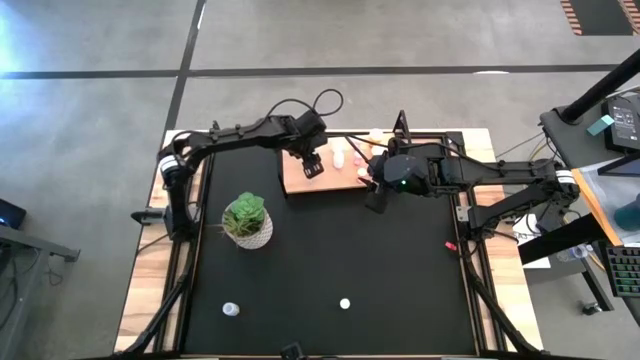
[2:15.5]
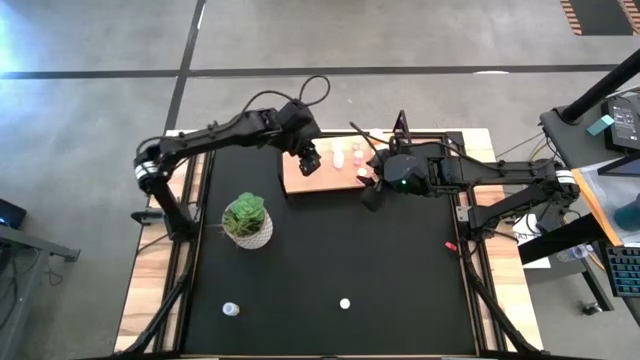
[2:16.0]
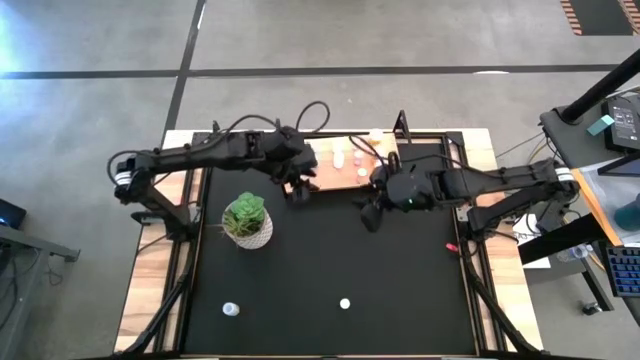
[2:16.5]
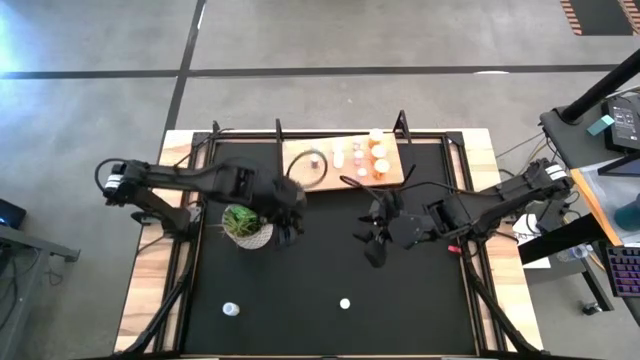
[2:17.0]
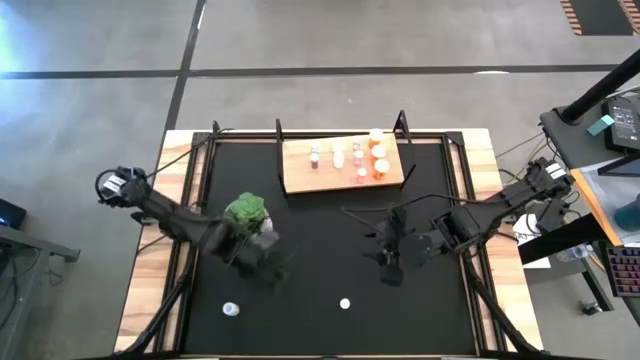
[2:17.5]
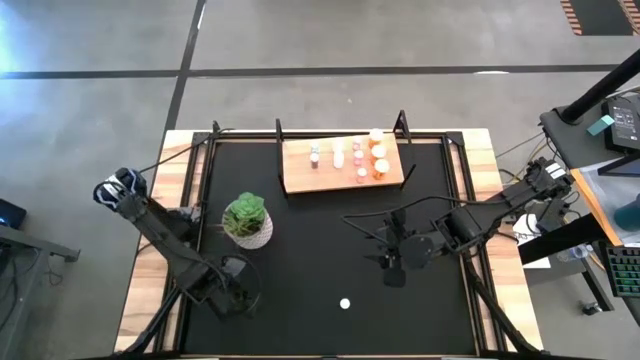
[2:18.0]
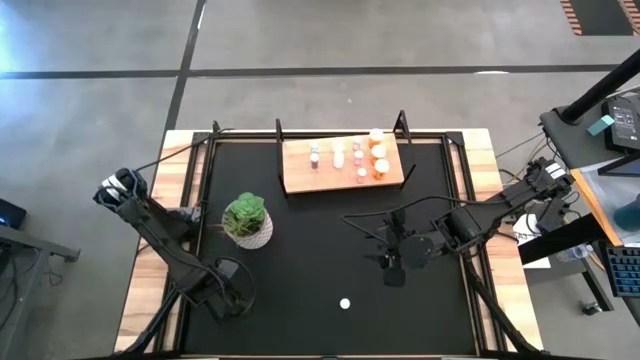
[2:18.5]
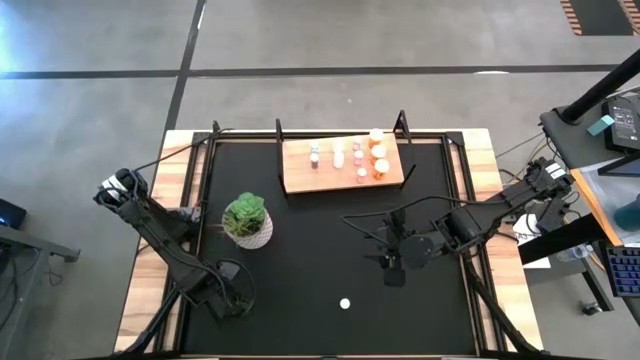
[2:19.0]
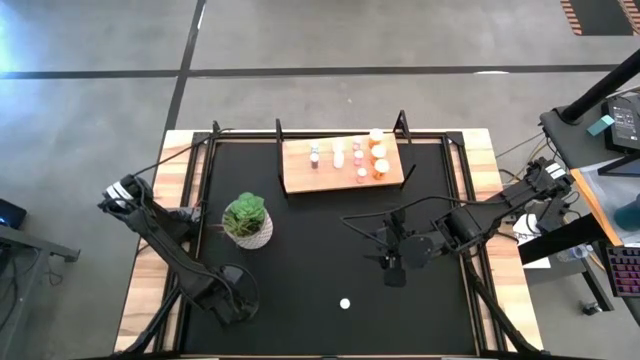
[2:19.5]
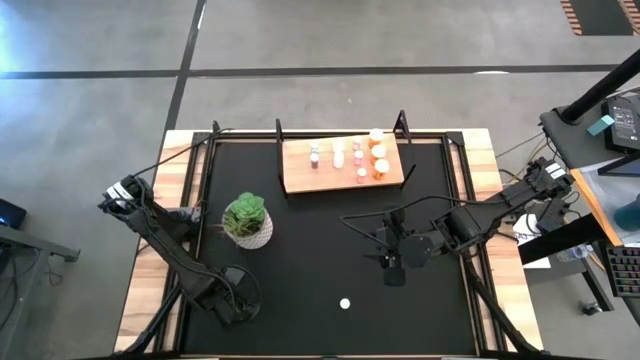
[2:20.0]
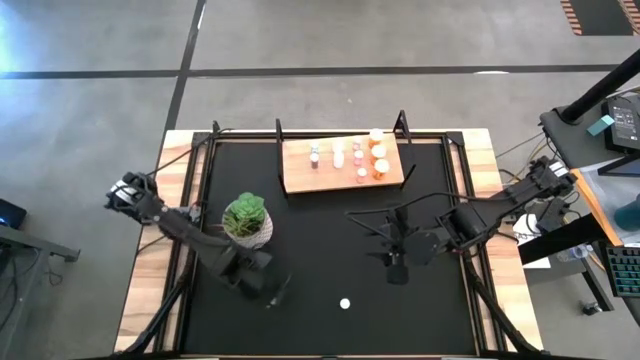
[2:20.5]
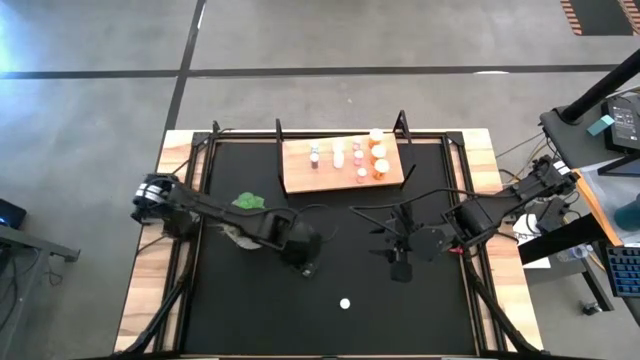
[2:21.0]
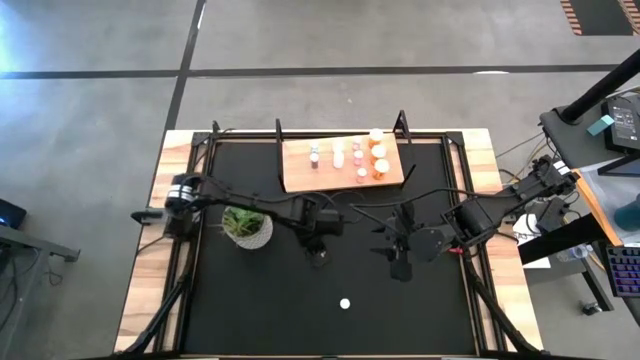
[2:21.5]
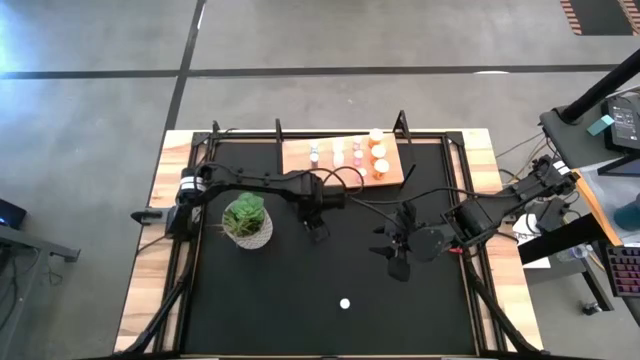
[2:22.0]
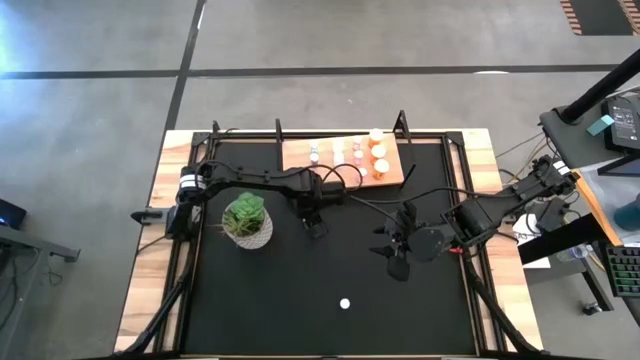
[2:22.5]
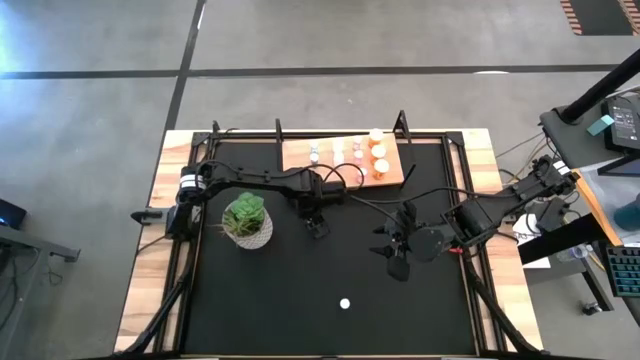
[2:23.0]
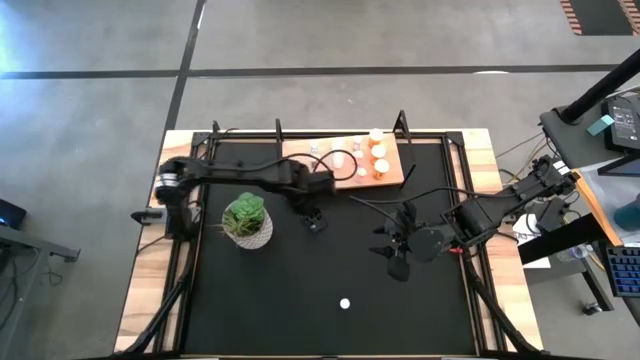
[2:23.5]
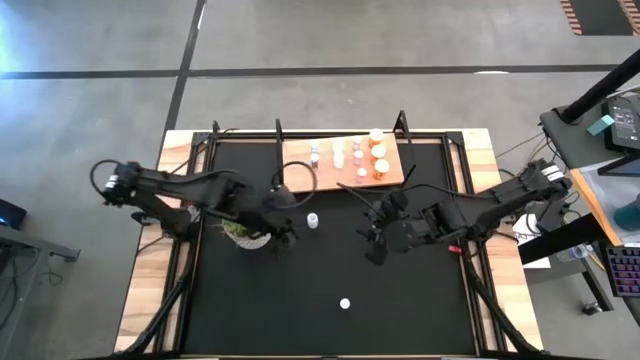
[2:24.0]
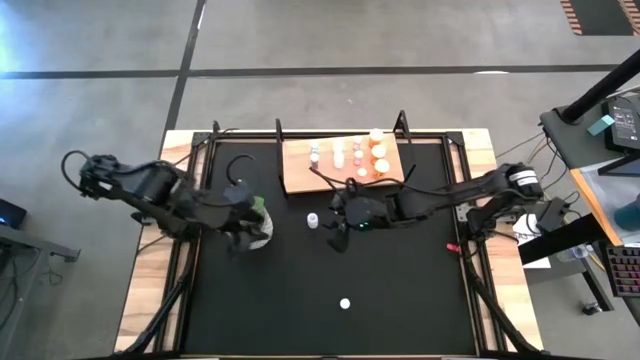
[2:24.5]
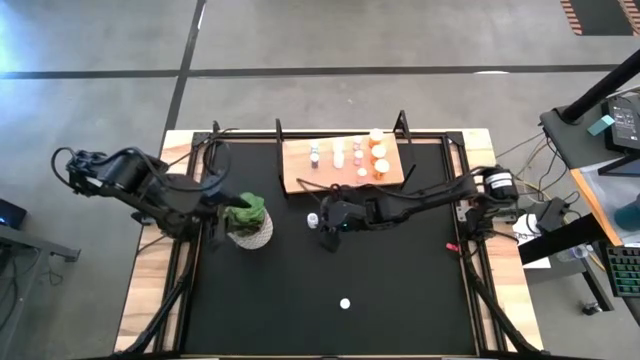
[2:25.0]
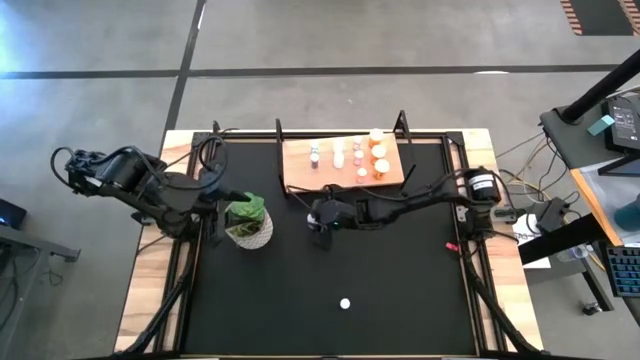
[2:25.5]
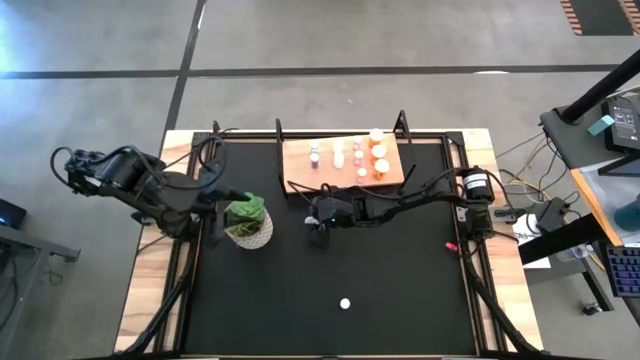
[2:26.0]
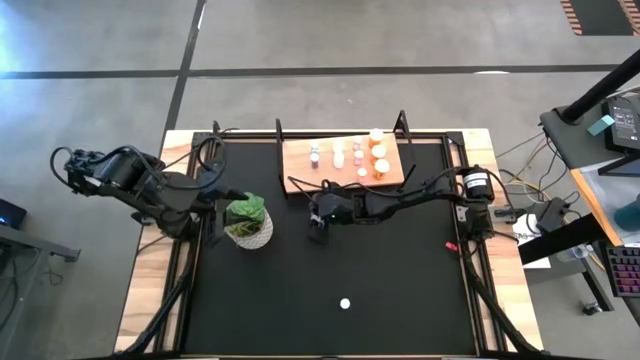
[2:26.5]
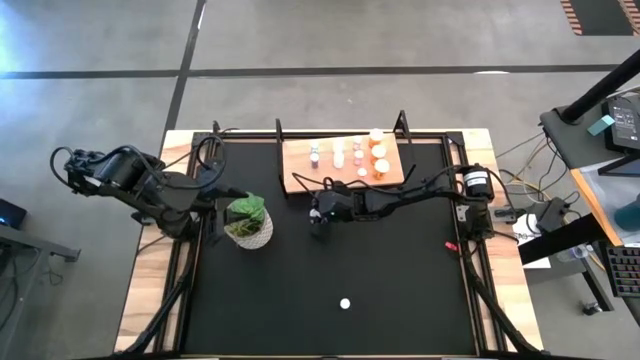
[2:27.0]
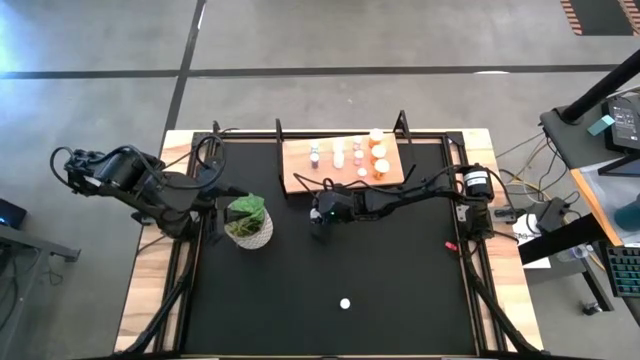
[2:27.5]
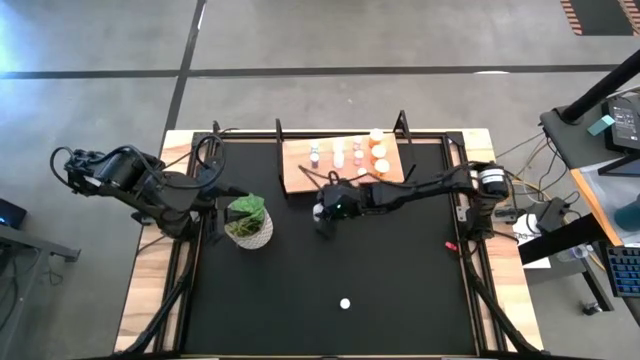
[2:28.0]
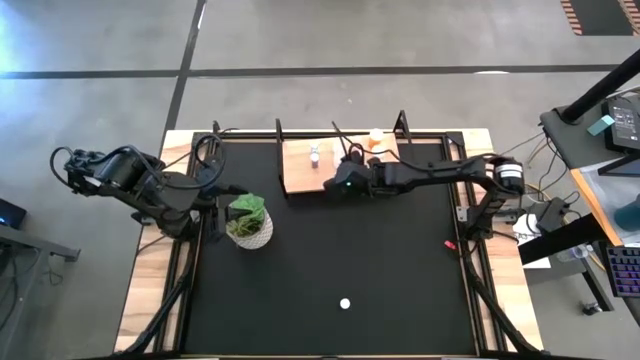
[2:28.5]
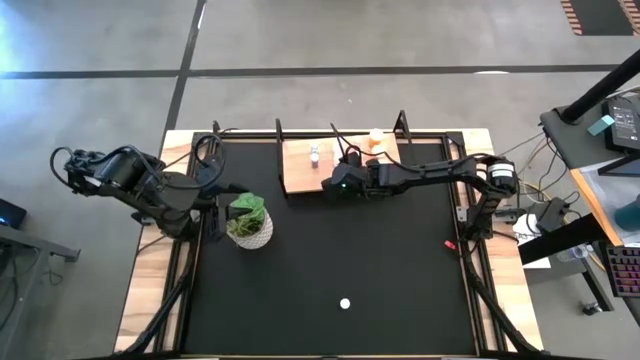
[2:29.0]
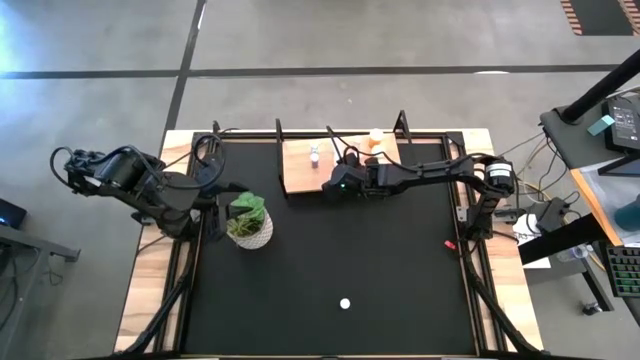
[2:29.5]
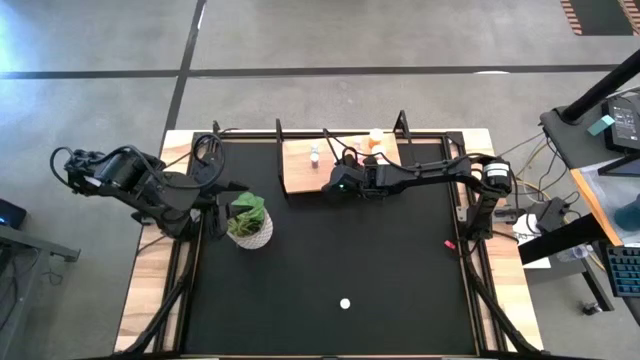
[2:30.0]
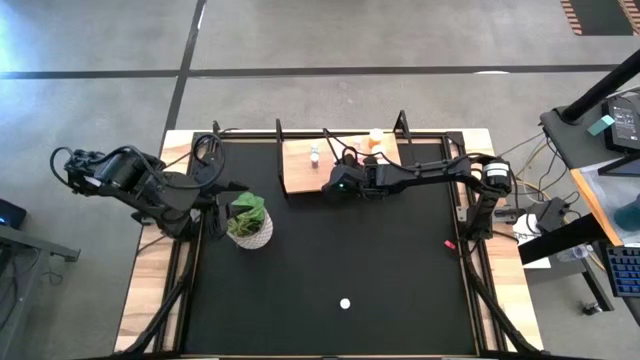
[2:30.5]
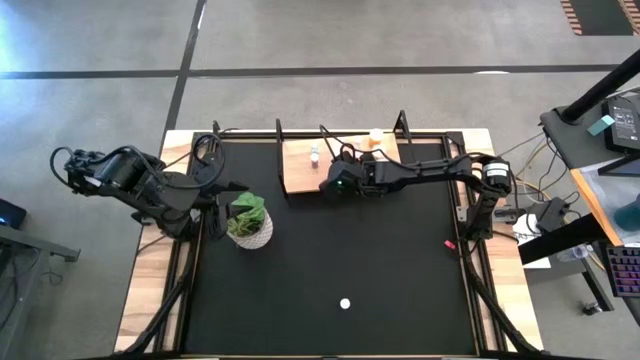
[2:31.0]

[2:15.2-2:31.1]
Task: Pick and place medicine bottles onto shelf by color
Put the white pill bottle on the shelf aligned with the other white pill bottles

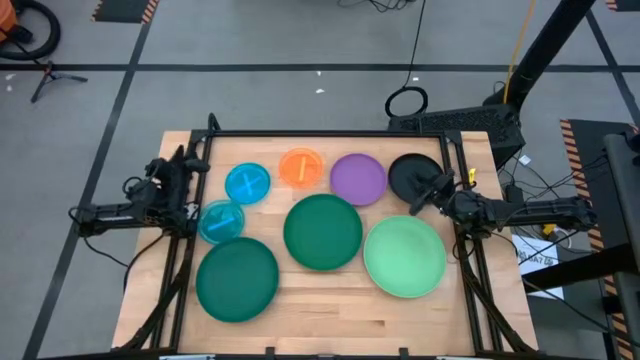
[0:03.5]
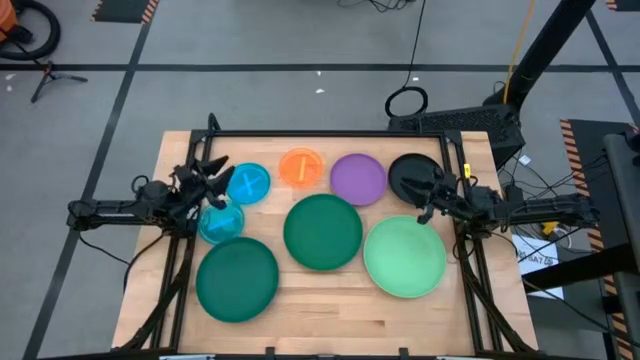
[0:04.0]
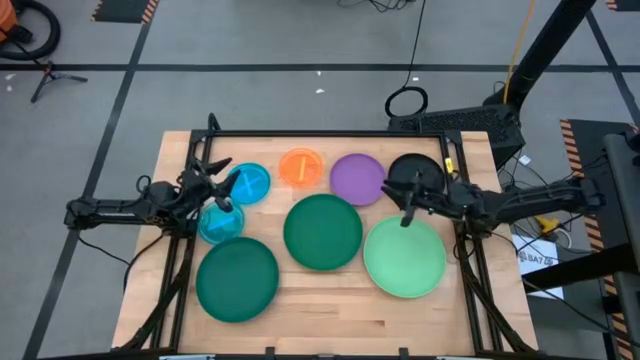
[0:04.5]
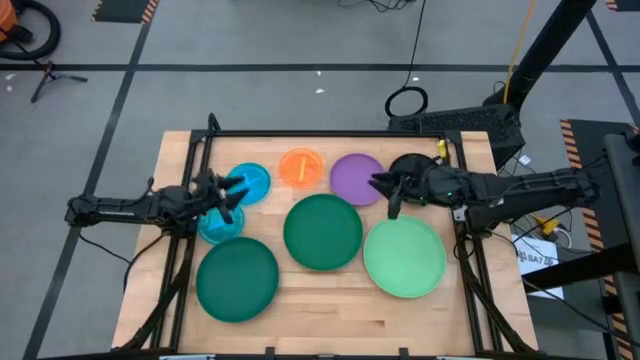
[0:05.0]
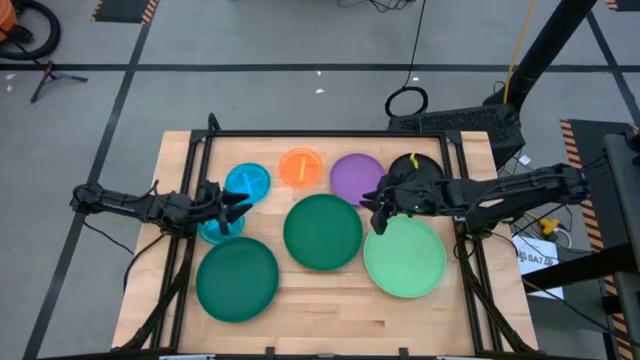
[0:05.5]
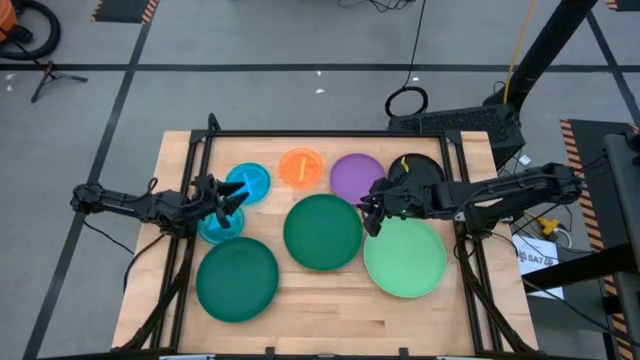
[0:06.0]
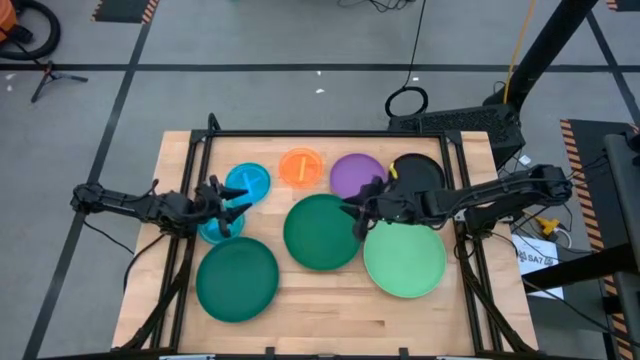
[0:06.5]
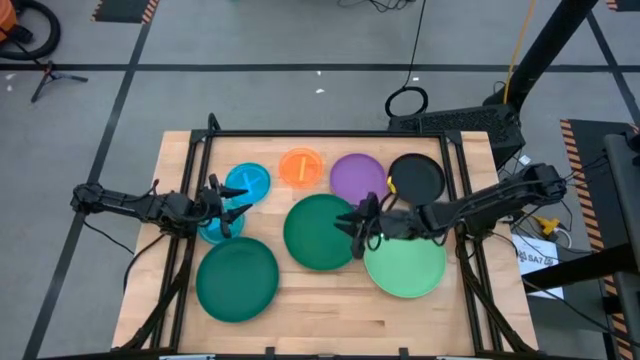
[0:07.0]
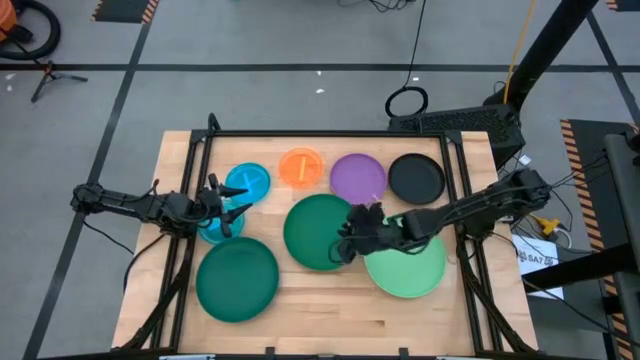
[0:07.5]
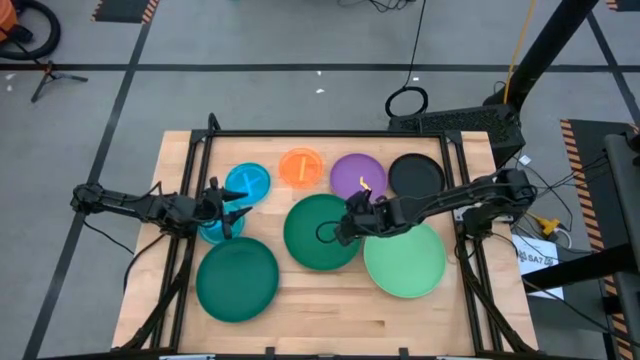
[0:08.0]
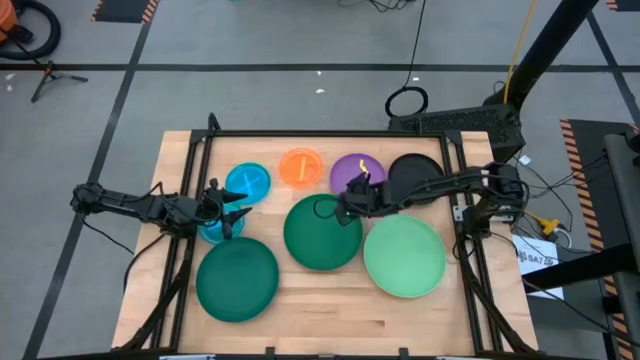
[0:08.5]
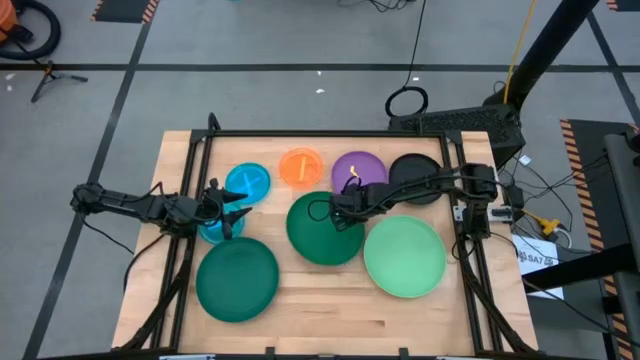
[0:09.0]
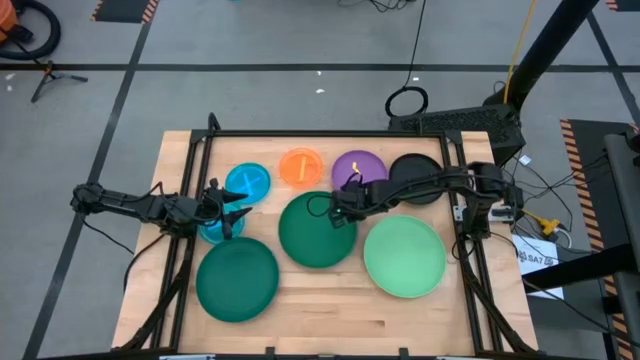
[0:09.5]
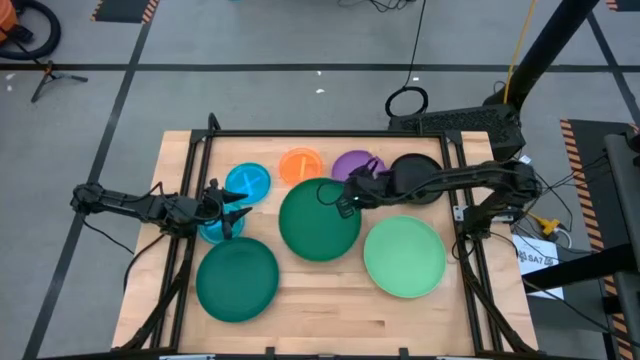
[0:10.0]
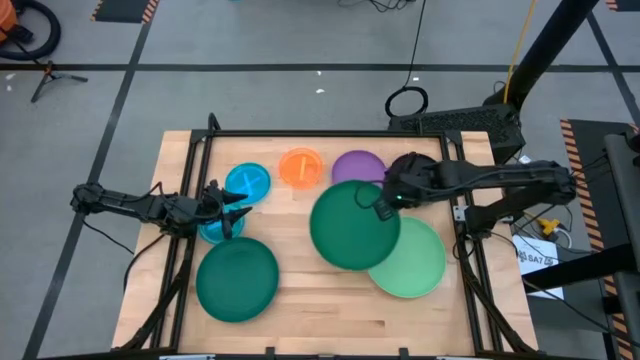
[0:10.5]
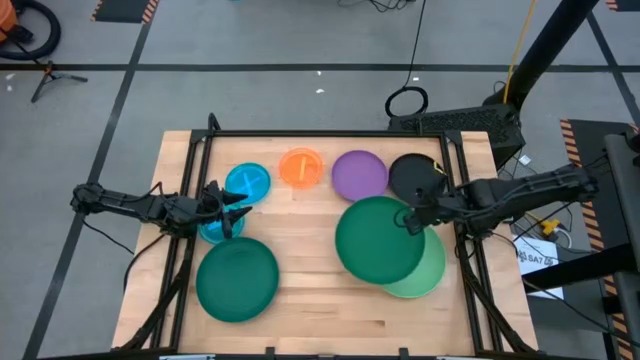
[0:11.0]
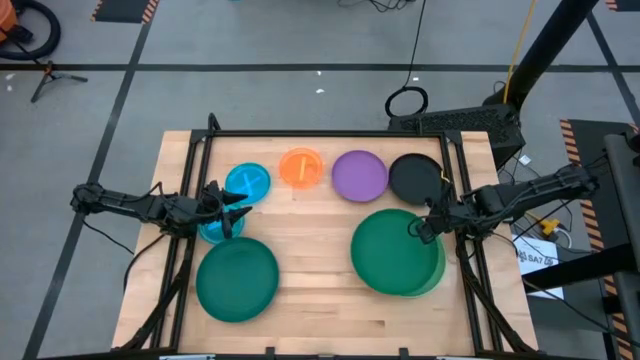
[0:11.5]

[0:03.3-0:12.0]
Task: Stack plastic plates
Stack the right dark green plate on top of the light green plate
